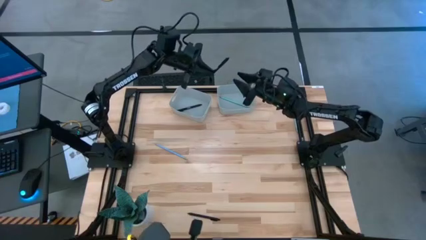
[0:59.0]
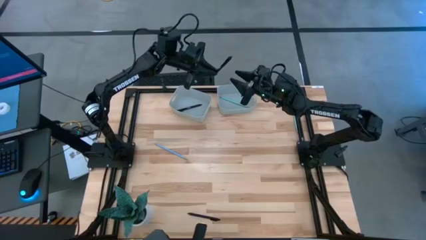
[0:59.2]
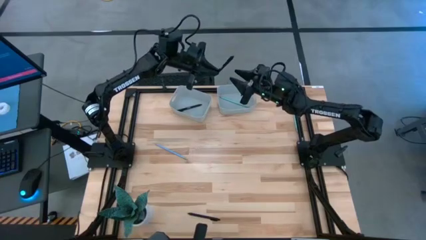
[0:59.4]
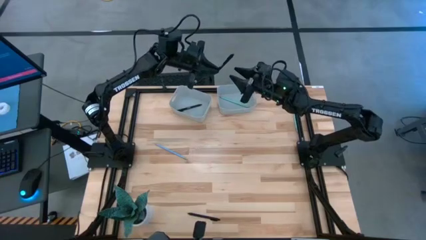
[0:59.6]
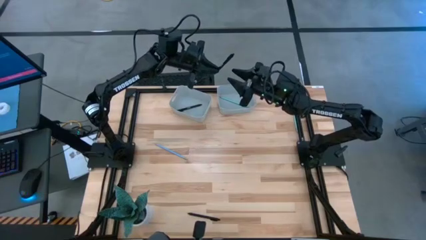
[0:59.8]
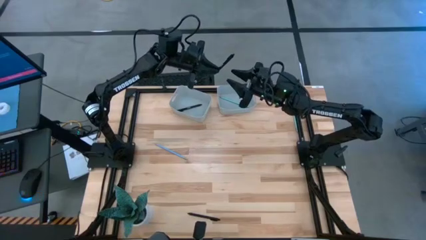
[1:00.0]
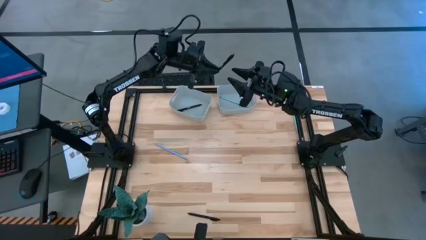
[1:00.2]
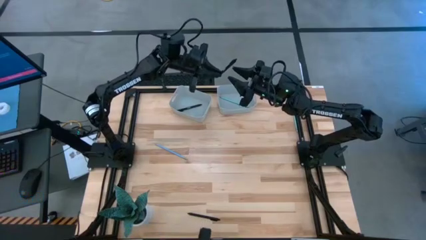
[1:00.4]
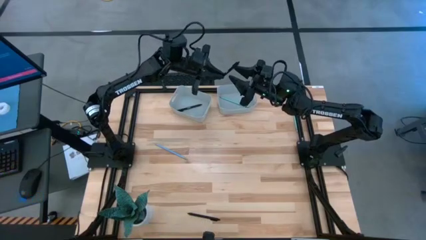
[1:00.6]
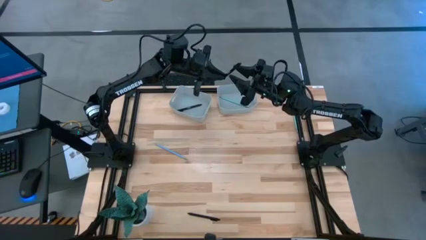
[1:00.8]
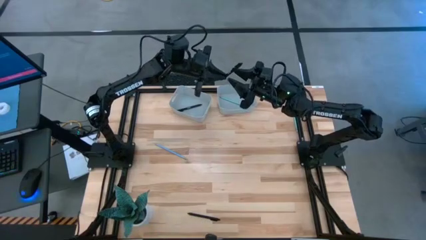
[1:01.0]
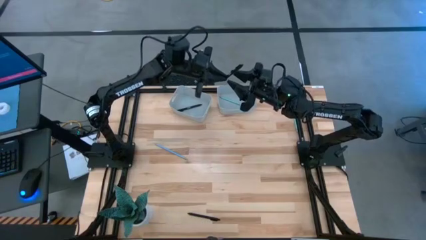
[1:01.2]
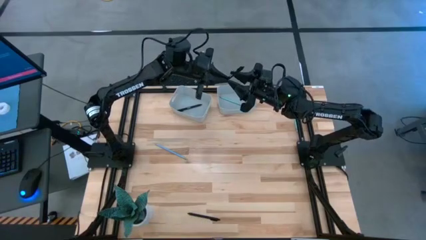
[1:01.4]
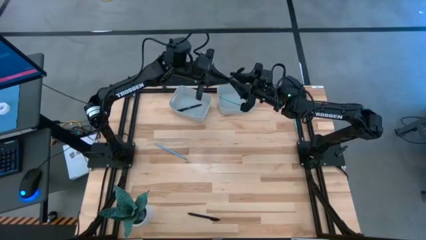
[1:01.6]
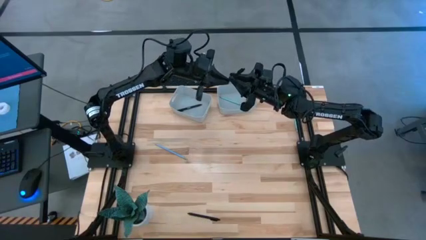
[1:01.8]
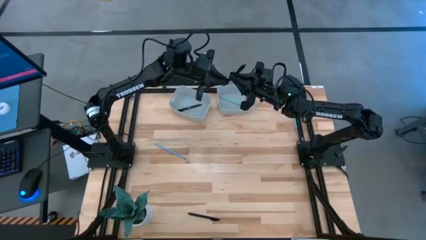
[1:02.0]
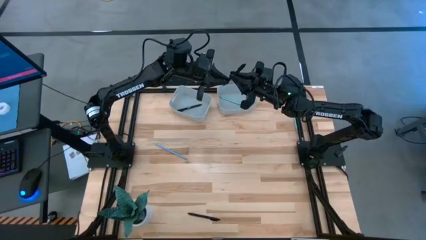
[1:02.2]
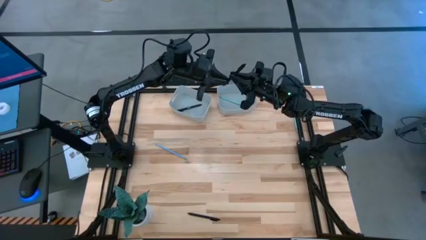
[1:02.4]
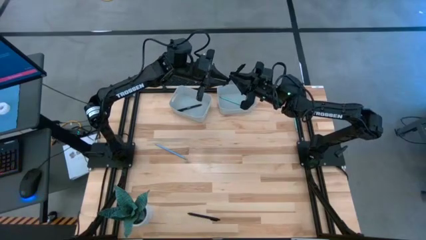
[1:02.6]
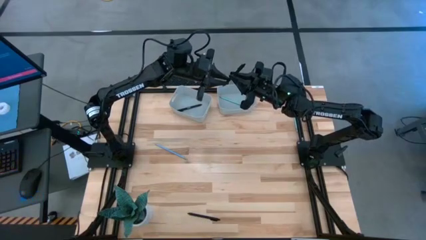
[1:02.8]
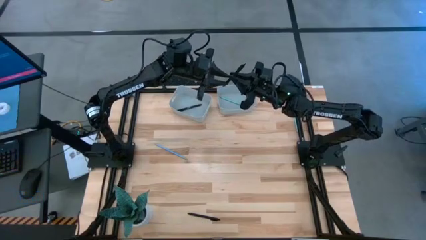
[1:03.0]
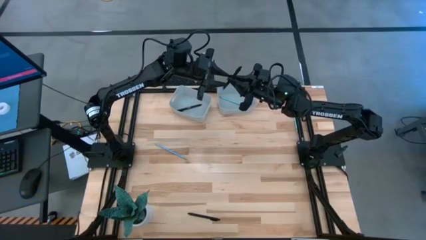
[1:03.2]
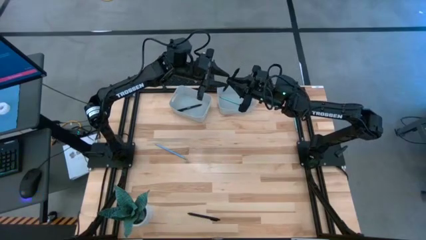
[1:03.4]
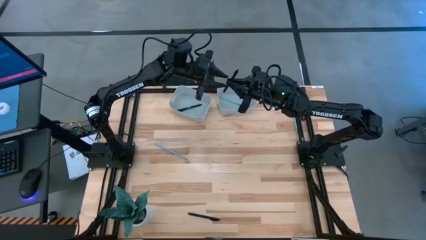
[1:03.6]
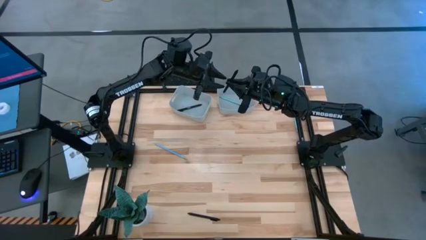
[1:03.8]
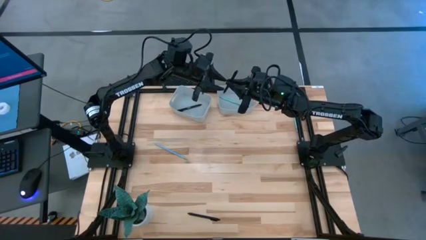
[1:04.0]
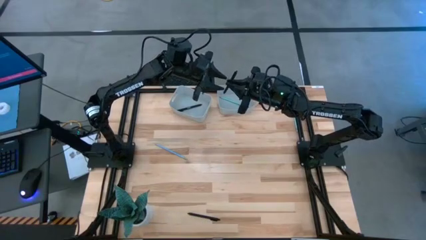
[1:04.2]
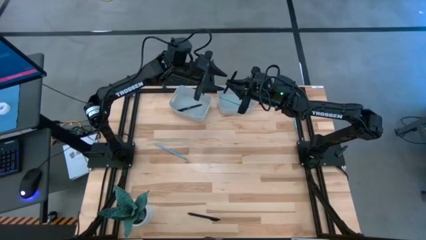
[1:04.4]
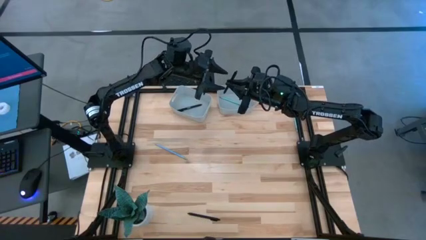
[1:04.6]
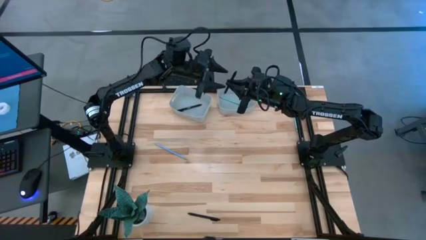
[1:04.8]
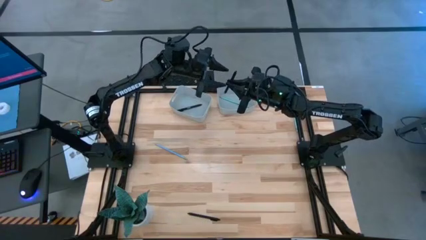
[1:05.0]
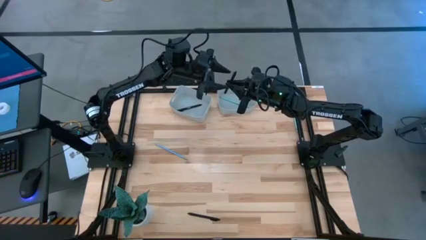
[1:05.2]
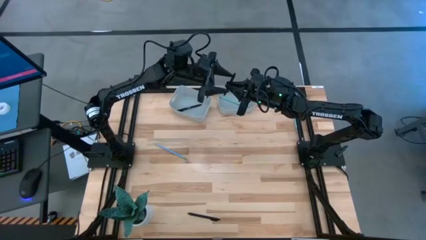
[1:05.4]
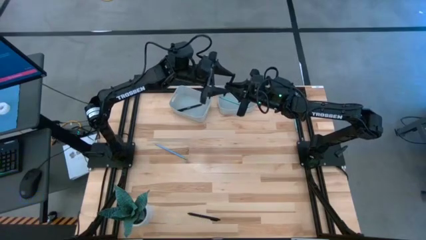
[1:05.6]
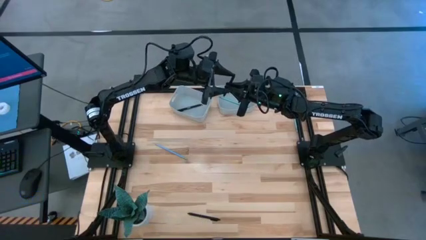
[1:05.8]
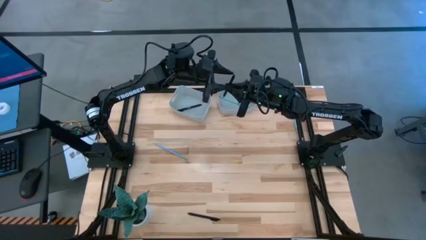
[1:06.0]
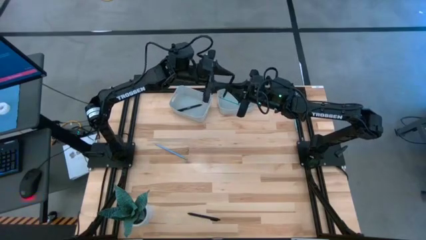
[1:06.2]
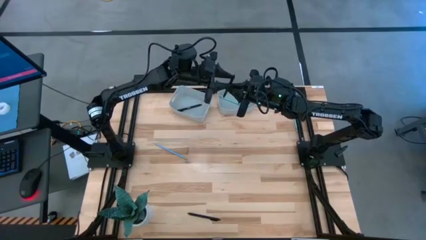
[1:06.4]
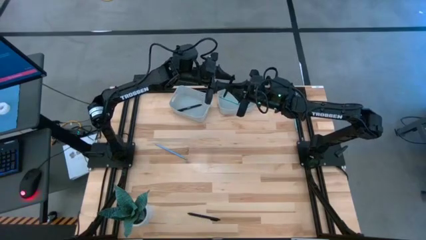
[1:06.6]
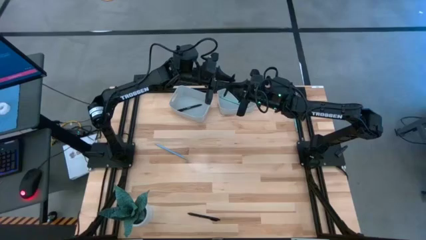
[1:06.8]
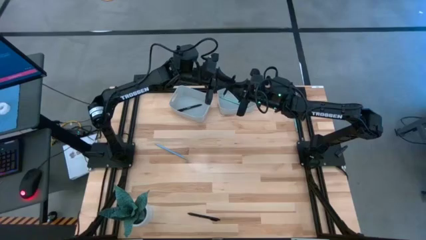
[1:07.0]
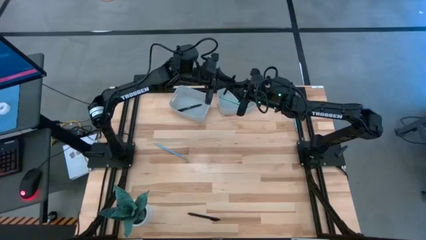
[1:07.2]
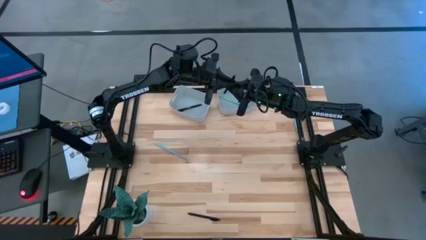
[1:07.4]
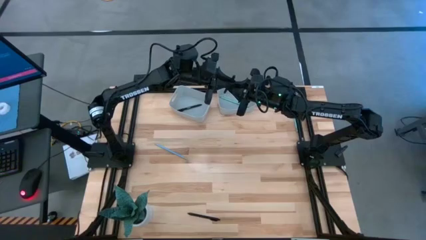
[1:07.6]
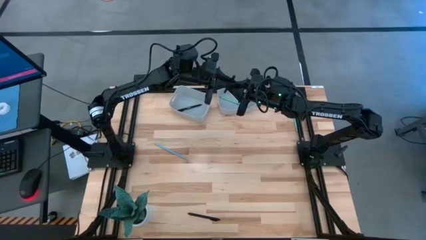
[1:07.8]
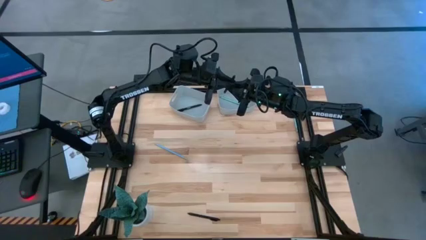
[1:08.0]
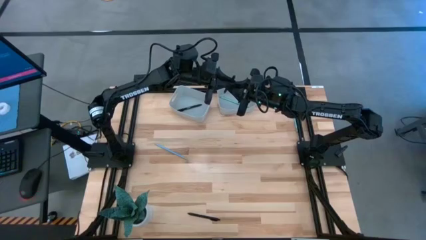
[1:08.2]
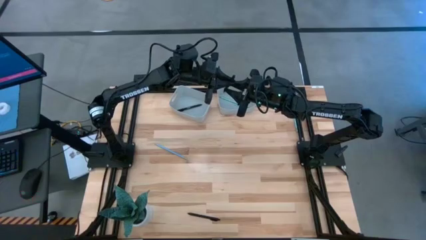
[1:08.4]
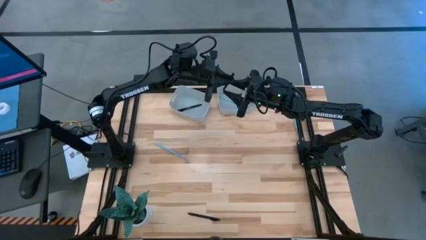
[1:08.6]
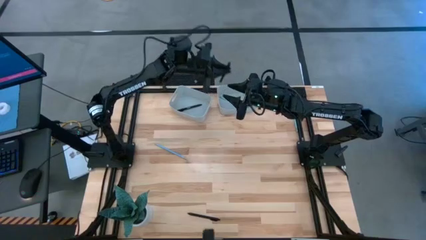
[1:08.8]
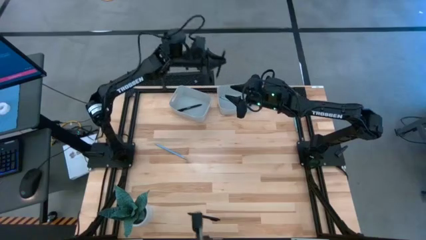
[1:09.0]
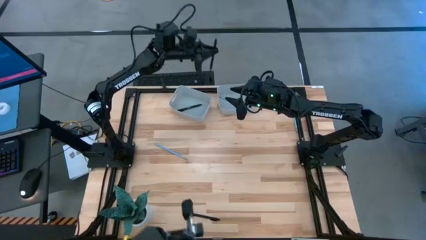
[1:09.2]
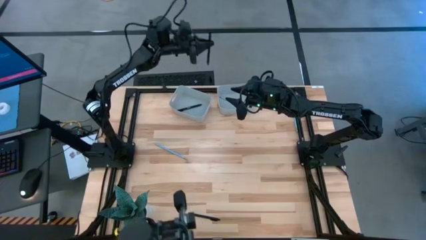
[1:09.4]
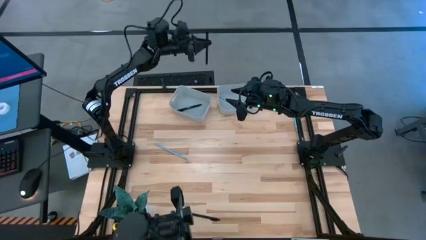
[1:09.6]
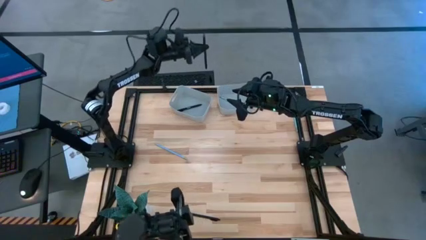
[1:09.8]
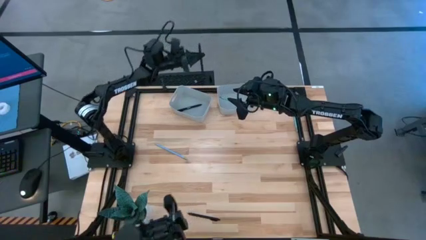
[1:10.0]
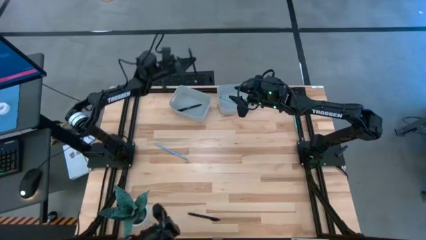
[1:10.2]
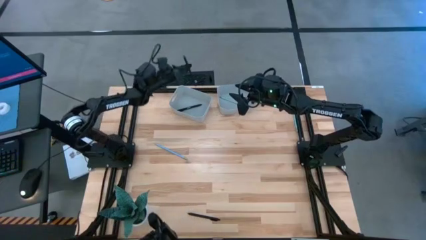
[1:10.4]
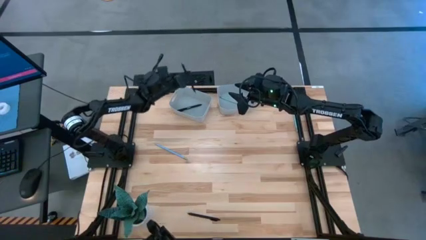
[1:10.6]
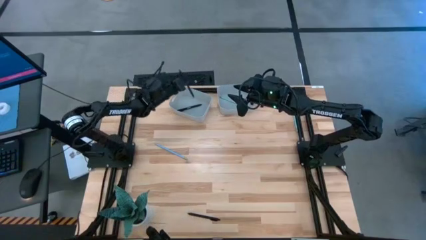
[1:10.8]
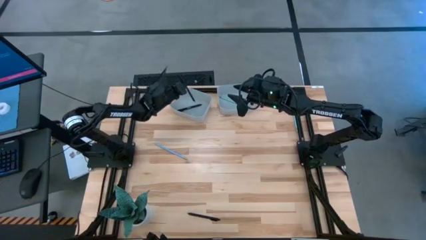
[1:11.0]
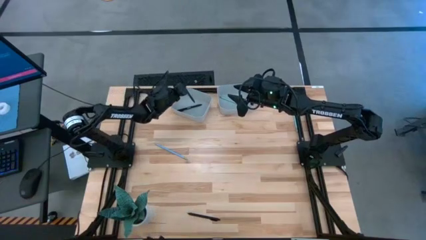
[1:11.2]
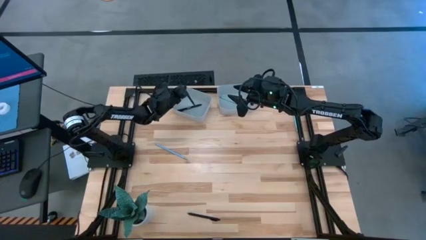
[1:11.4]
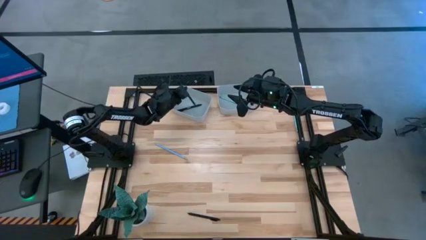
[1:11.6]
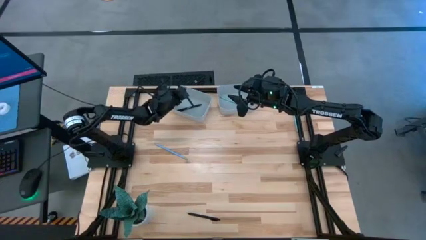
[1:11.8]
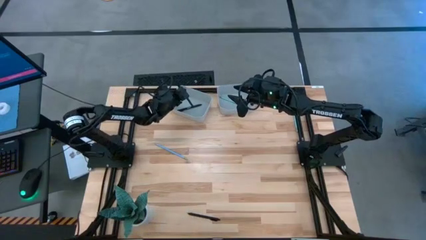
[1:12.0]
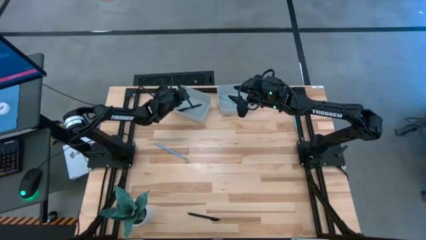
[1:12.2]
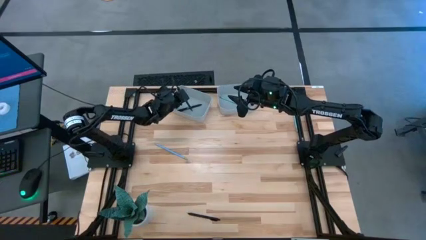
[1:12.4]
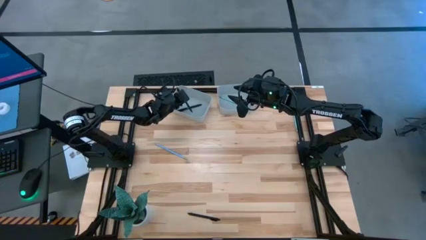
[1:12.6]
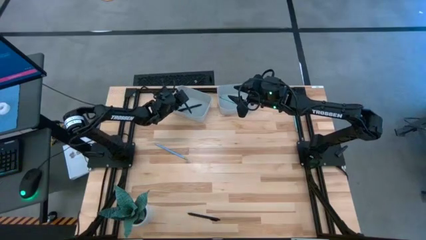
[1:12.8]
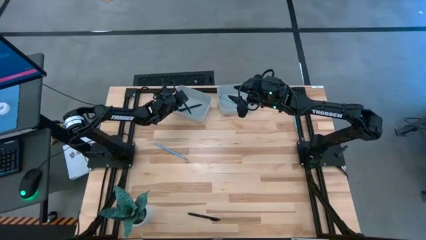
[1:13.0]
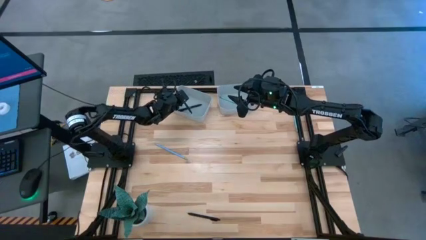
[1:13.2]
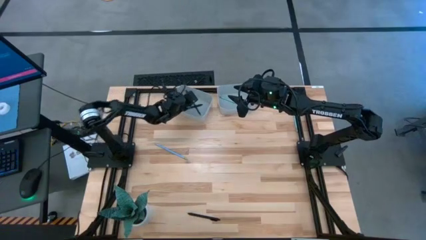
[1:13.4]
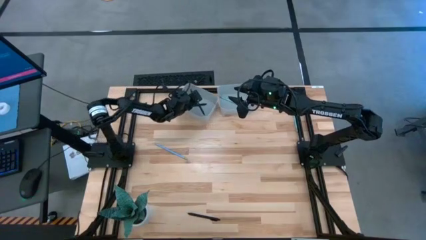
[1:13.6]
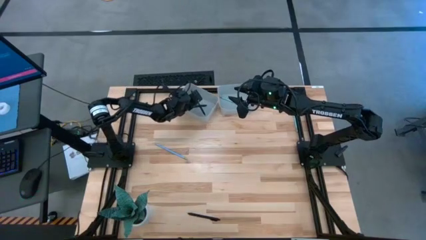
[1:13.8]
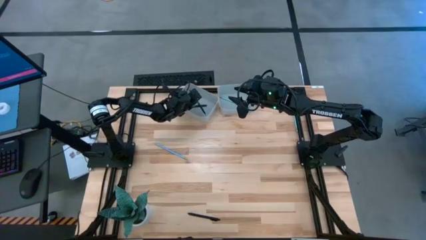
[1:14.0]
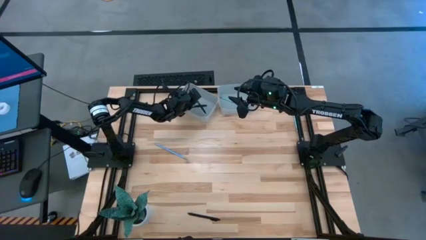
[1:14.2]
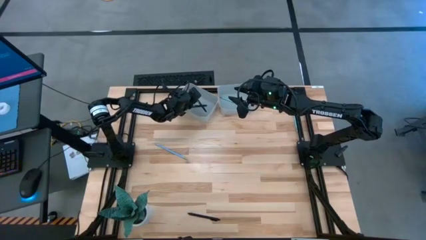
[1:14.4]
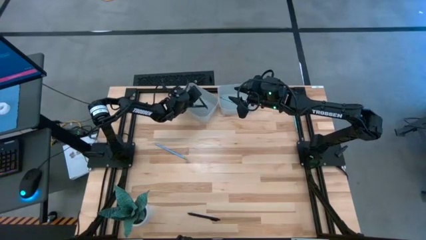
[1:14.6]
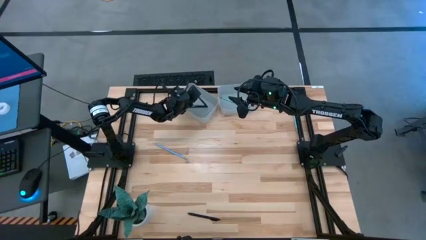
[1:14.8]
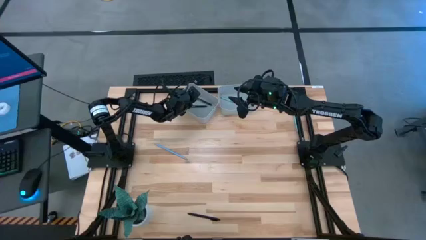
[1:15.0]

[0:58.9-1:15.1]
Task: Sort pens & pencils
Put the top black pen into the left gray bin
